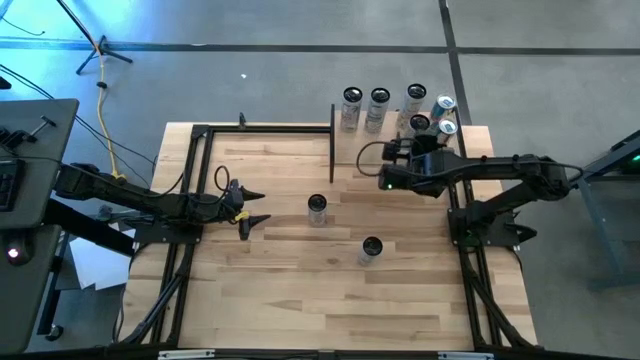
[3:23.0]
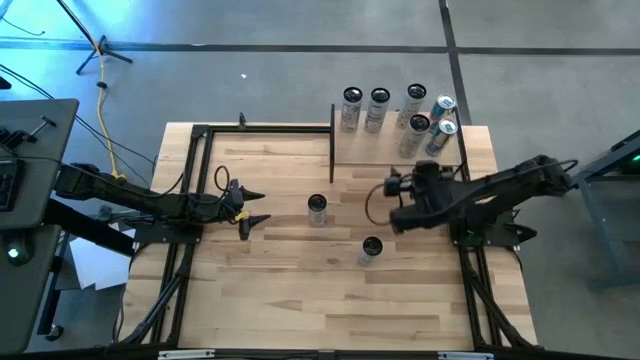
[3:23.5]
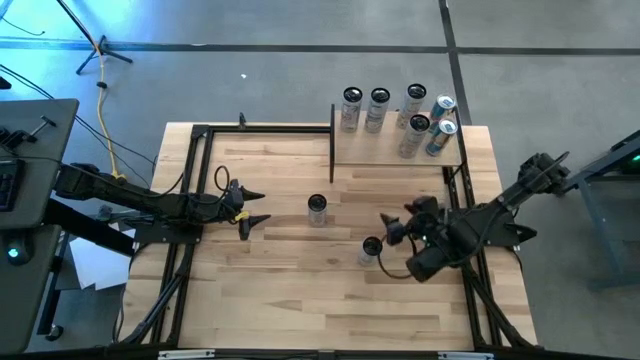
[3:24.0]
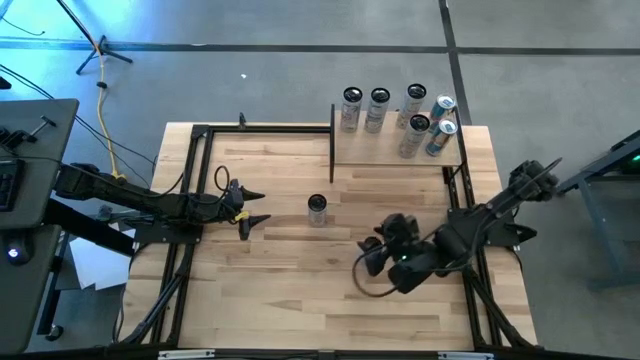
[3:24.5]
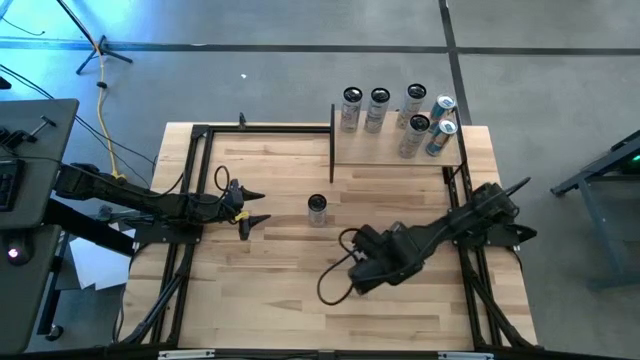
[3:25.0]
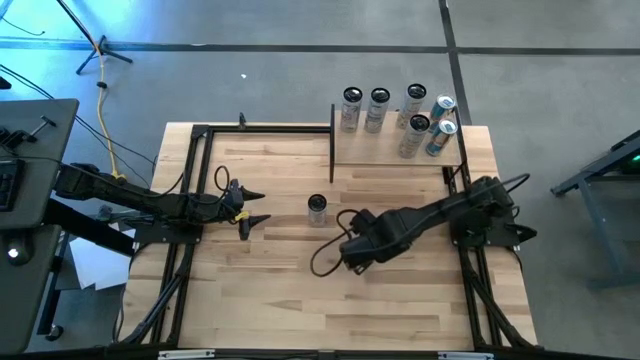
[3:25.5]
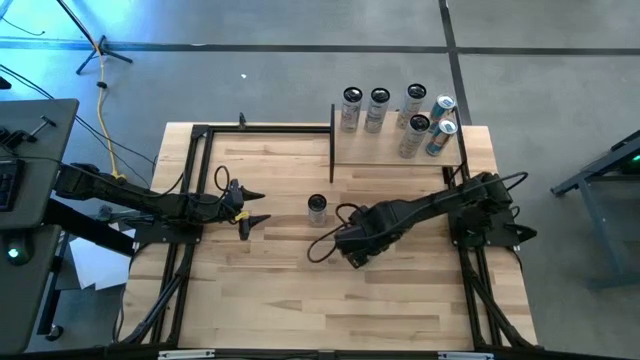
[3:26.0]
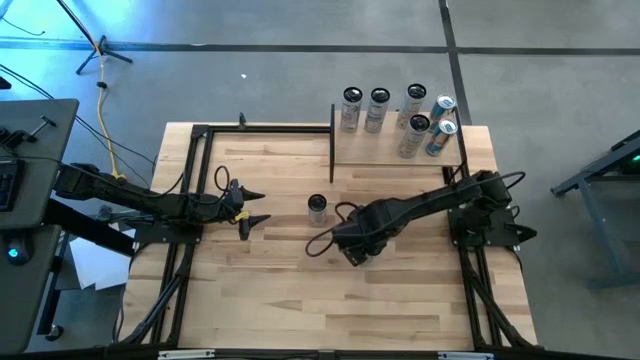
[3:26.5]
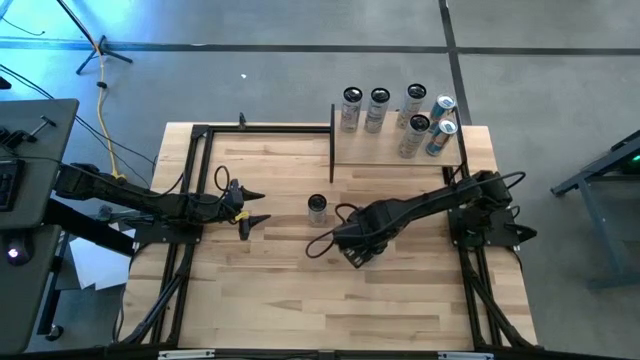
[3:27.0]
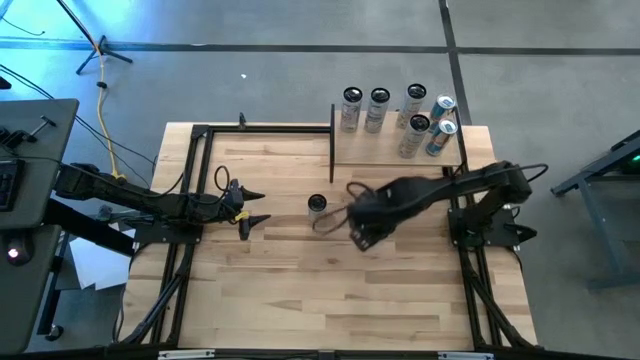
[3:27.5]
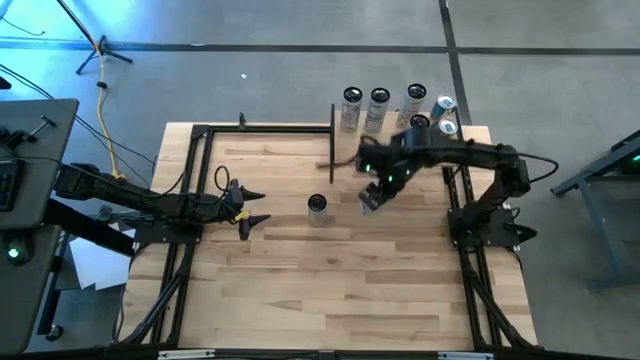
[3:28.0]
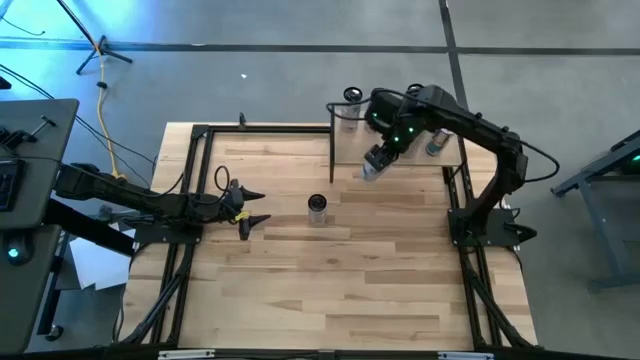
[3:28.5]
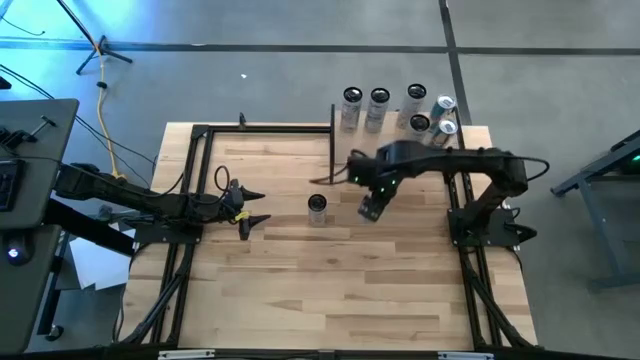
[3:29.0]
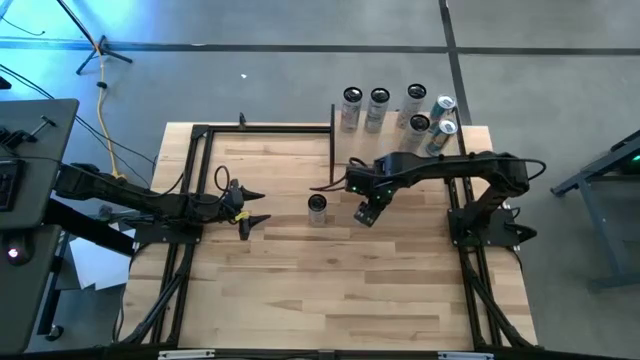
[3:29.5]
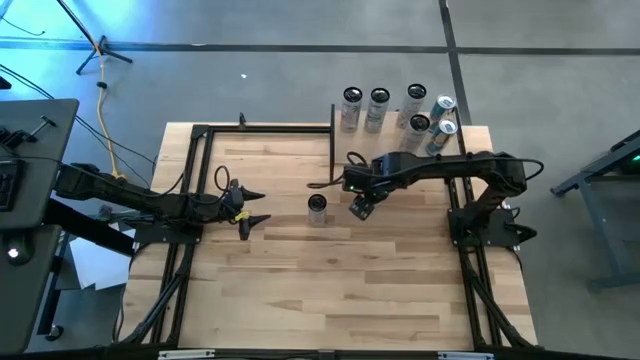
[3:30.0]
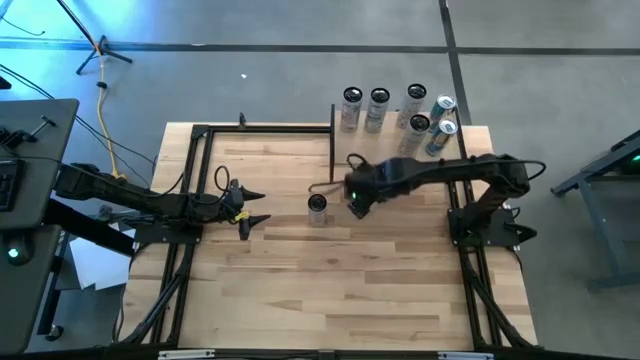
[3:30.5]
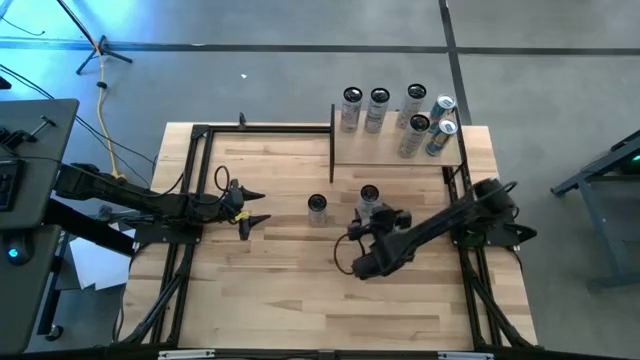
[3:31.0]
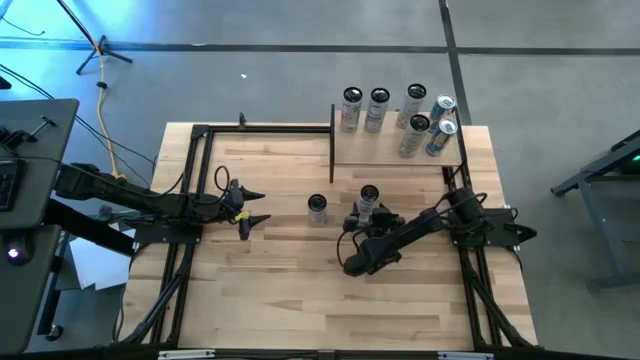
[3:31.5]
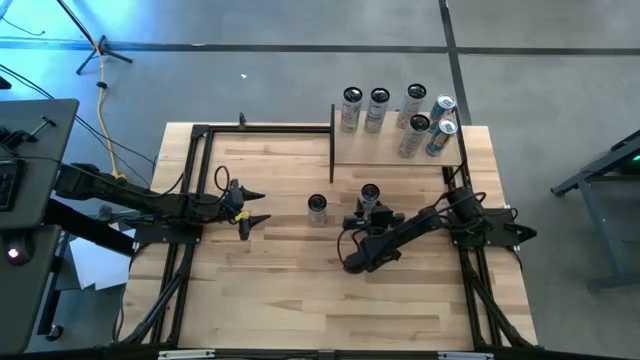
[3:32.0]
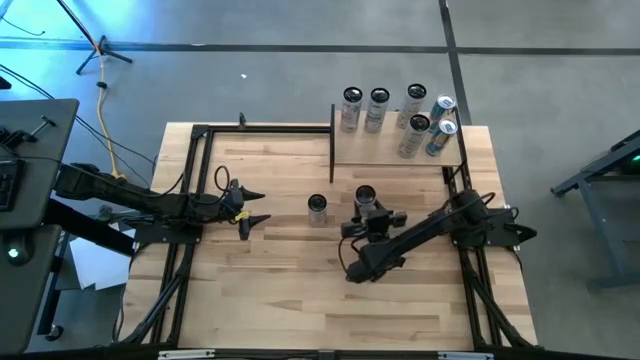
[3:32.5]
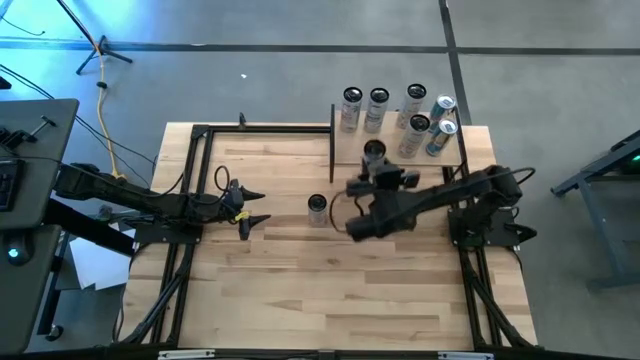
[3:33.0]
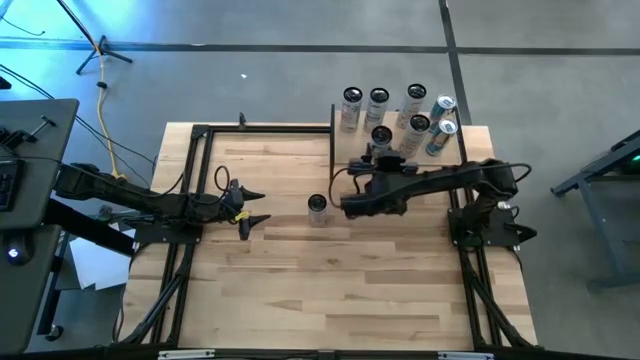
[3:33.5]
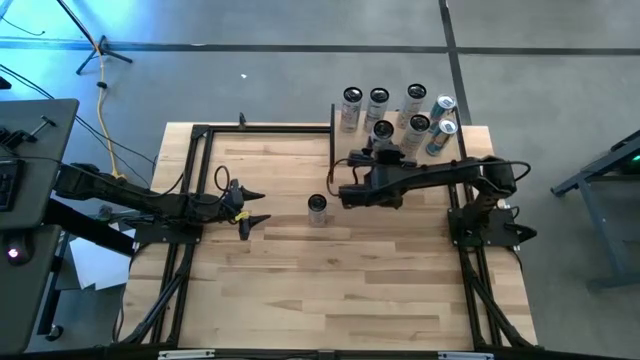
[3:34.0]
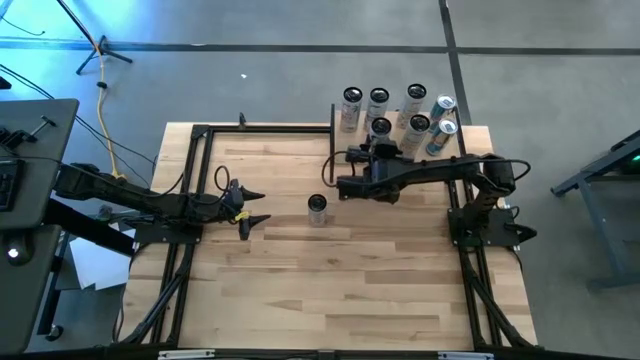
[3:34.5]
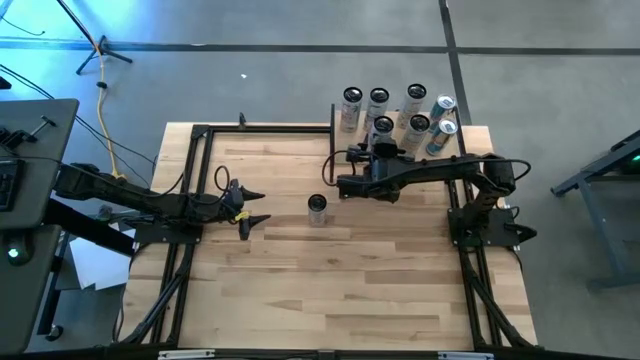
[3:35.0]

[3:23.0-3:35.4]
Task: Place canned beverage on shelf
Put the white blue soda can on the shelf aligned with the white blue soda can

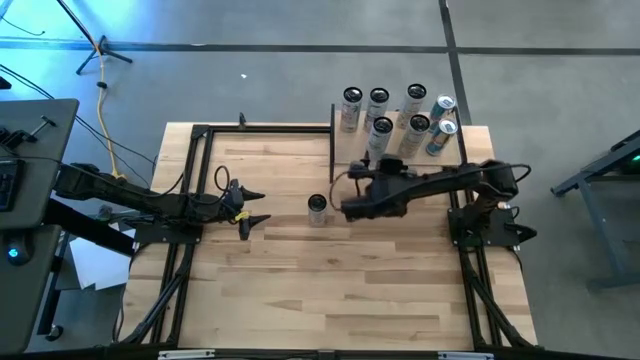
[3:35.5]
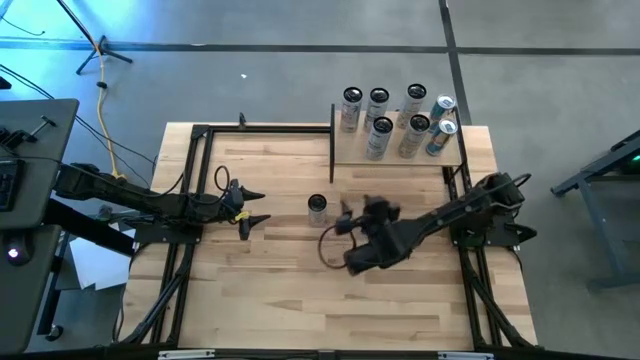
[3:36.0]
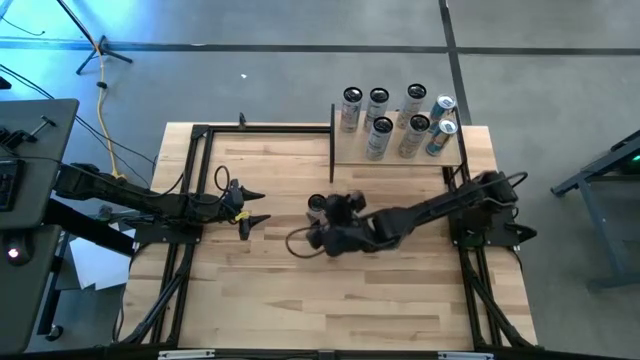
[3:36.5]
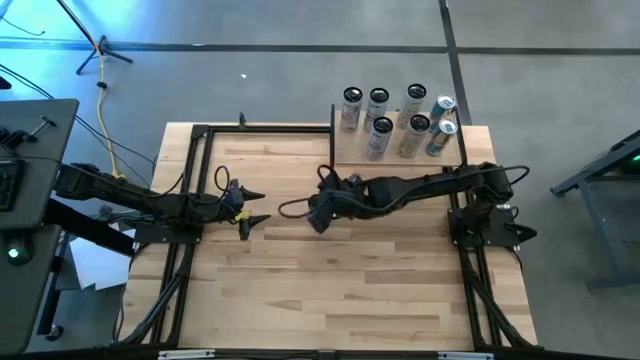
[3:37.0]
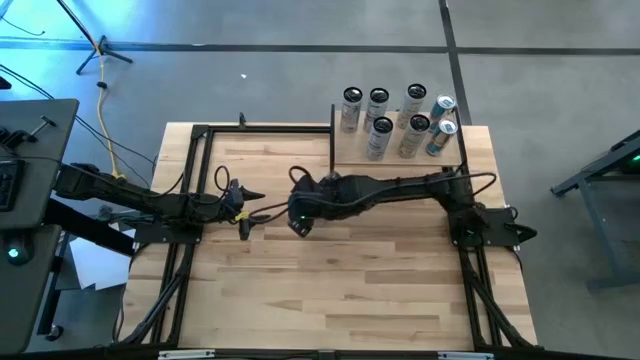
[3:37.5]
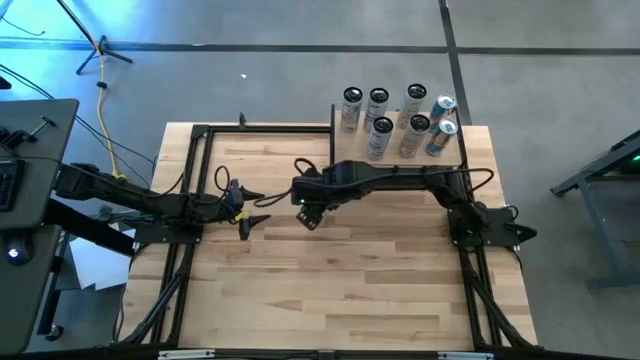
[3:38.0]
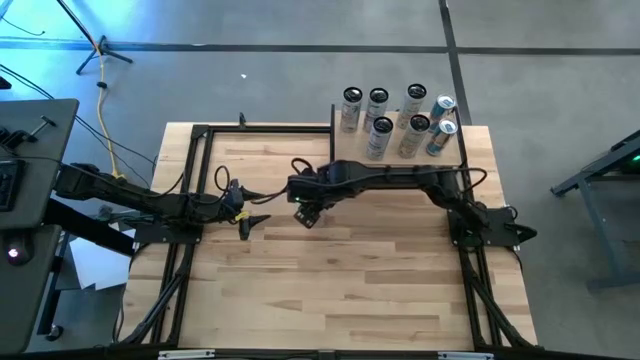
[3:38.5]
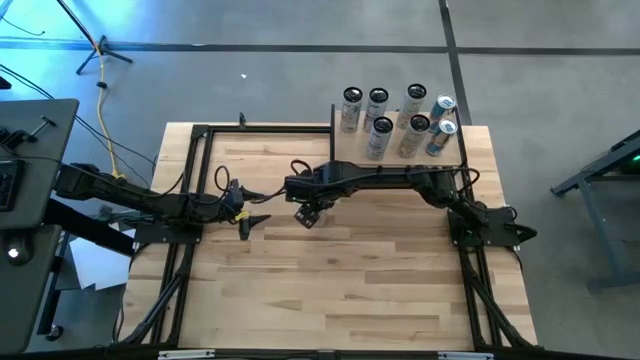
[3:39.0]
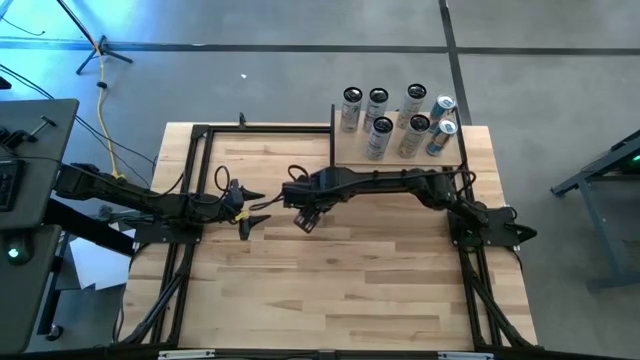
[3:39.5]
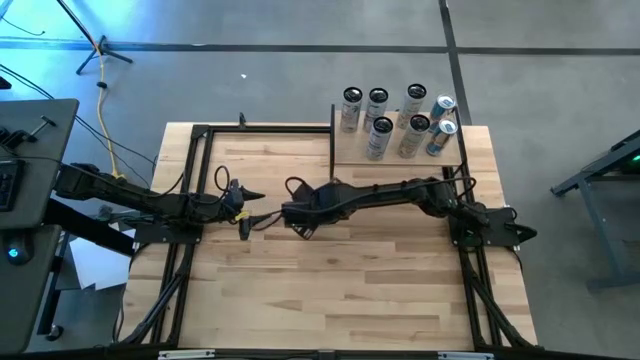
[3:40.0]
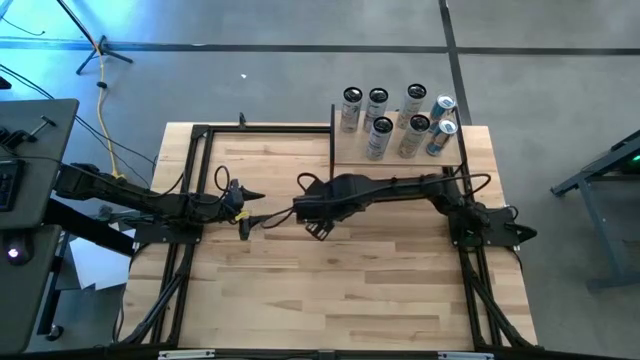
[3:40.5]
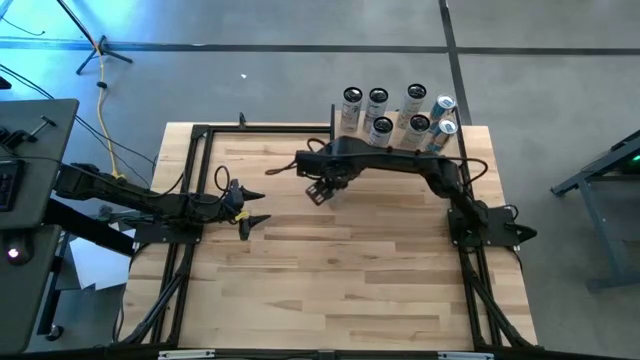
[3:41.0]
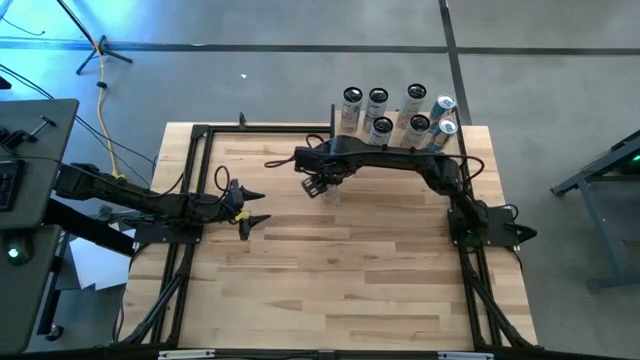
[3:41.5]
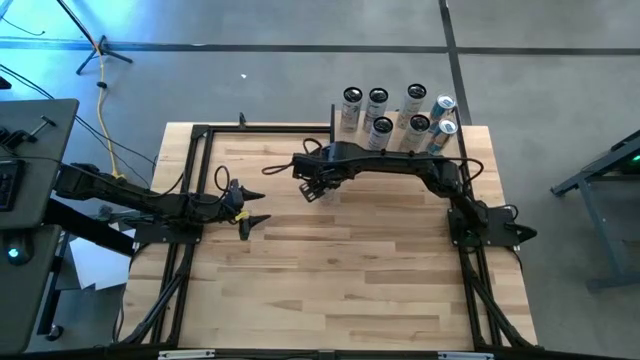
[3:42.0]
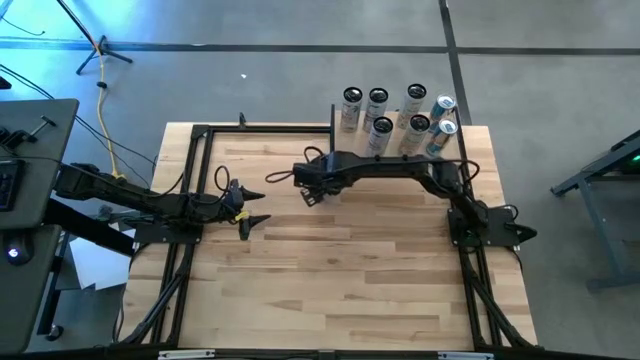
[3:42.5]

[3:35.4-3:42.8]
Put the white pink soda can on the shelf aligned with the white pink soda can

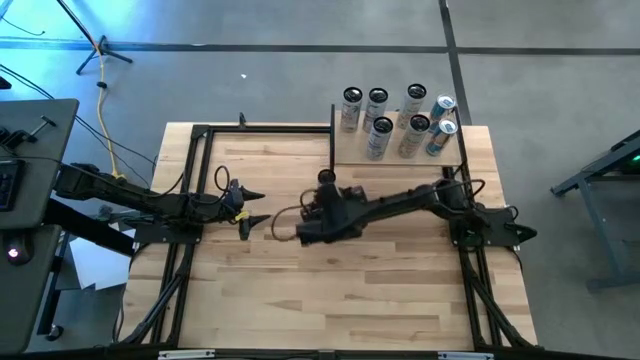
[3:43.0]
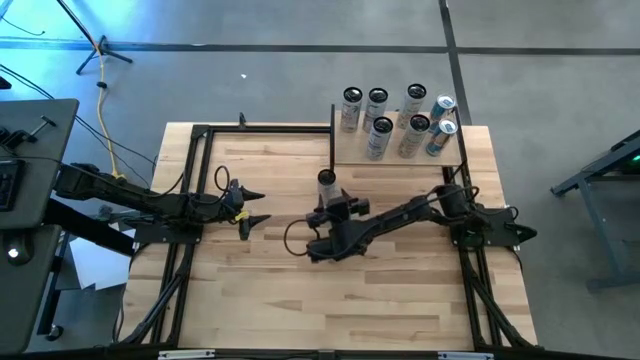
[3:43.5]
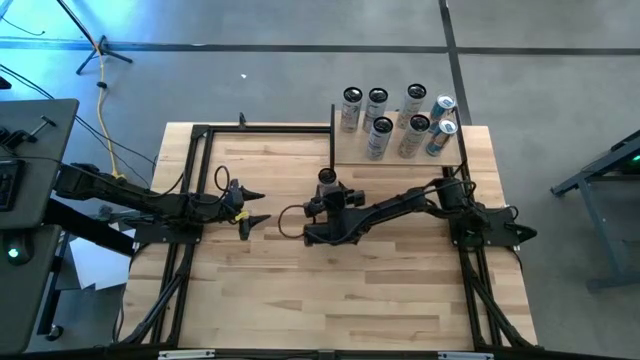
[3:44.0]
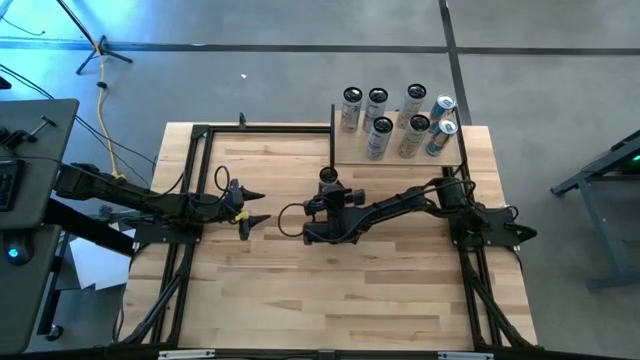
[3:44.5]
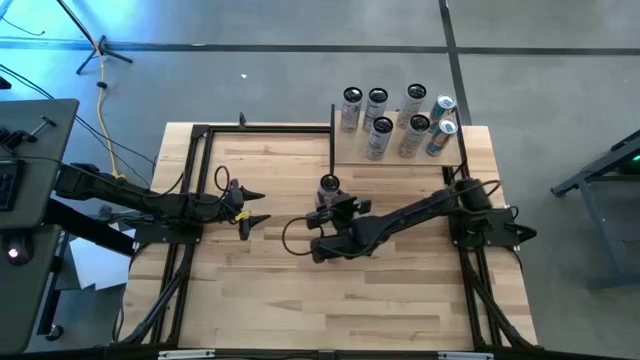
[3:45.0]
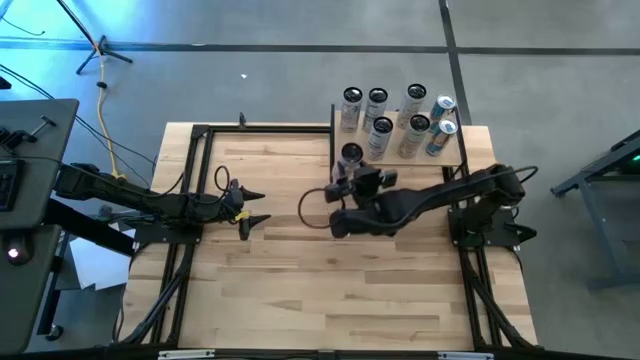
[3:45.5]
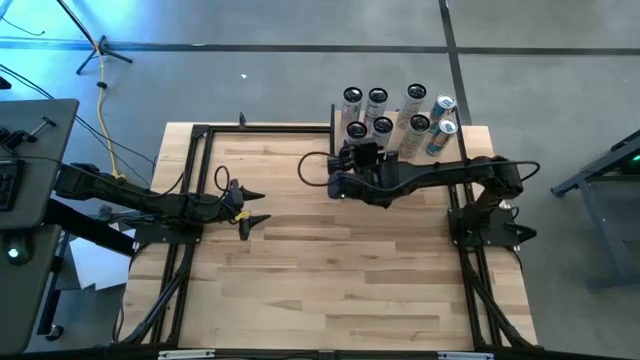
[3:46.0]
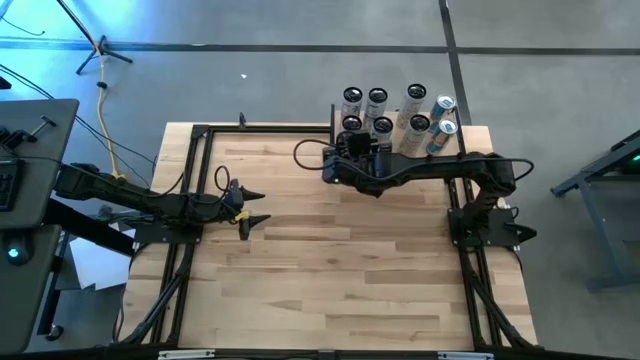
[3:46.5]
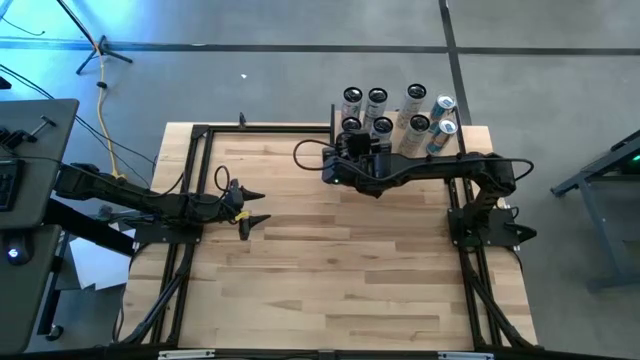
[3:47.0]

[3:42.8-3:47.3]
Put the white pink soda can on the shelf aligned with the white pink soda can
